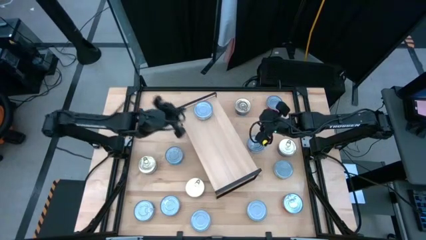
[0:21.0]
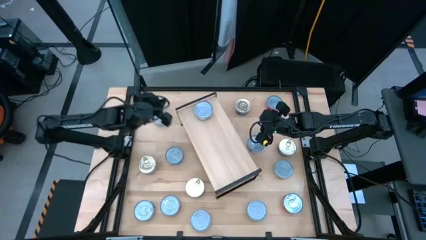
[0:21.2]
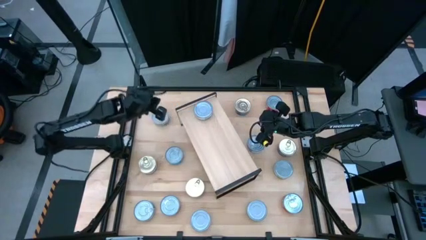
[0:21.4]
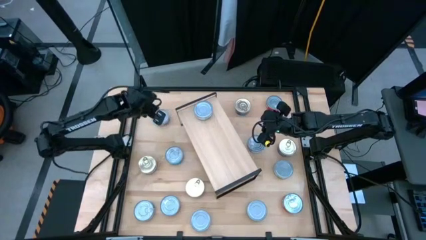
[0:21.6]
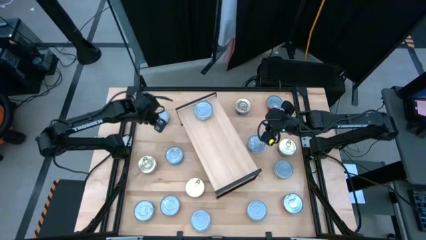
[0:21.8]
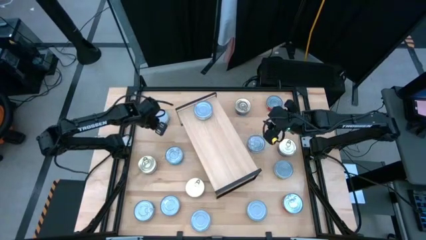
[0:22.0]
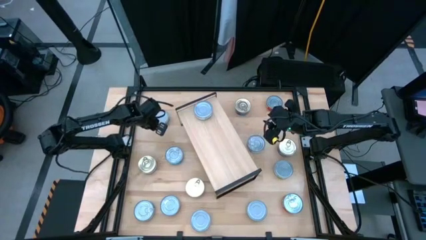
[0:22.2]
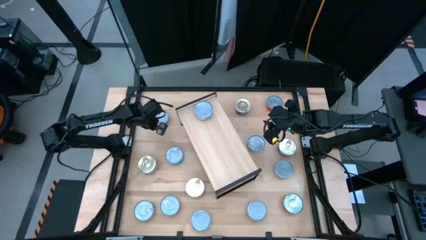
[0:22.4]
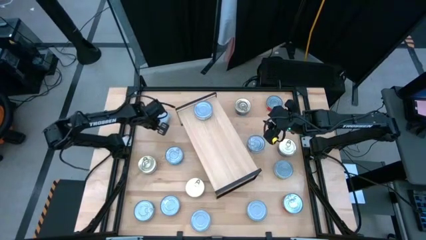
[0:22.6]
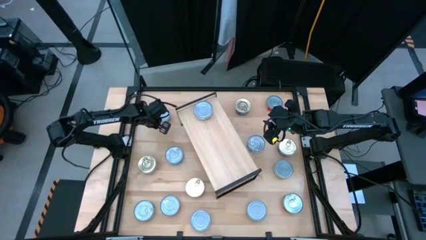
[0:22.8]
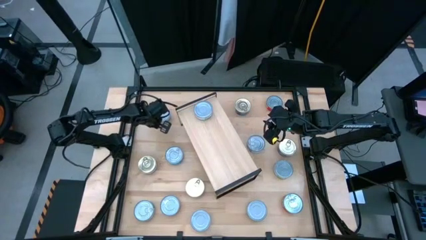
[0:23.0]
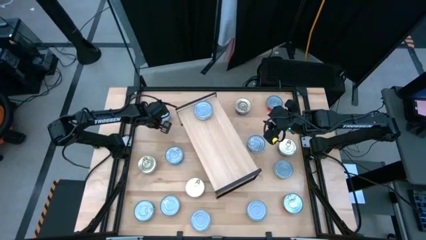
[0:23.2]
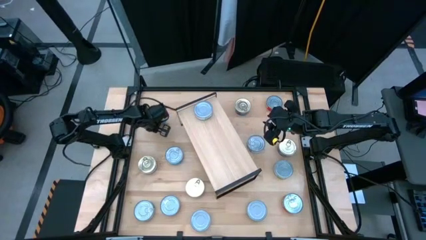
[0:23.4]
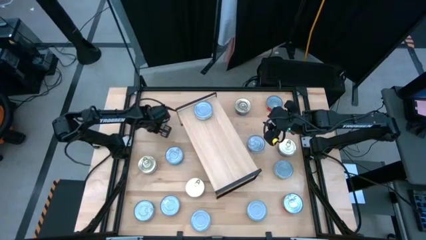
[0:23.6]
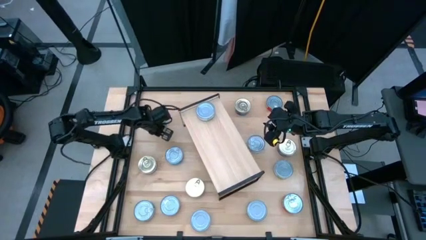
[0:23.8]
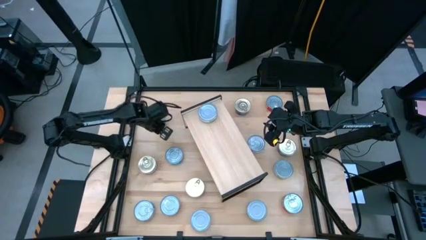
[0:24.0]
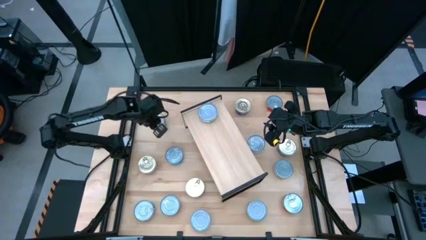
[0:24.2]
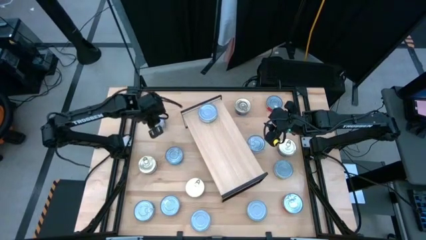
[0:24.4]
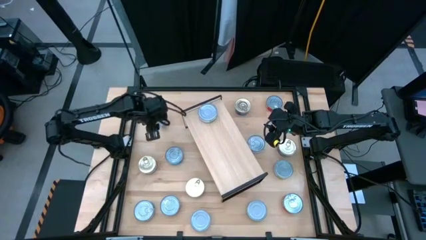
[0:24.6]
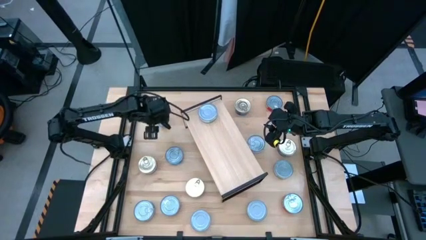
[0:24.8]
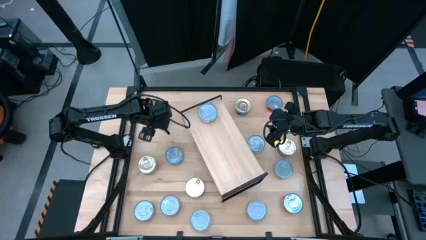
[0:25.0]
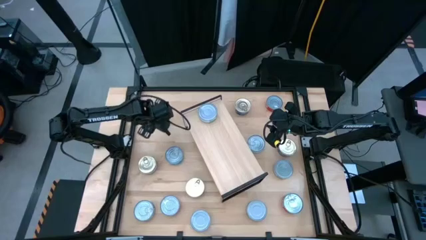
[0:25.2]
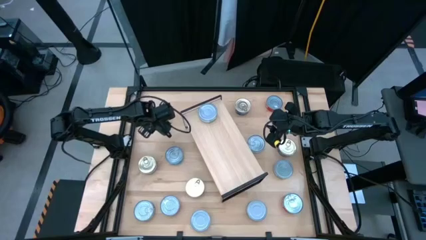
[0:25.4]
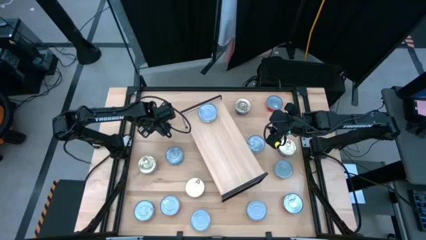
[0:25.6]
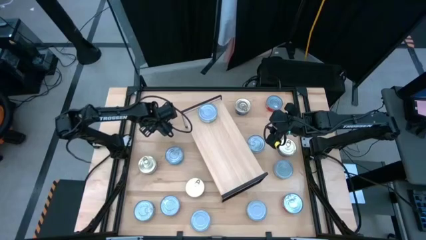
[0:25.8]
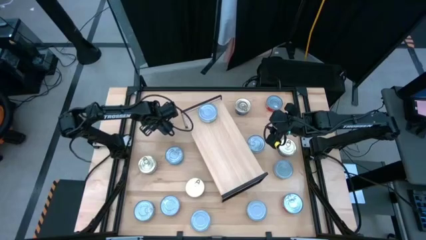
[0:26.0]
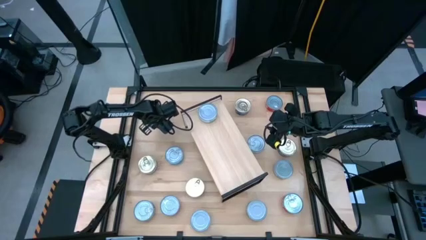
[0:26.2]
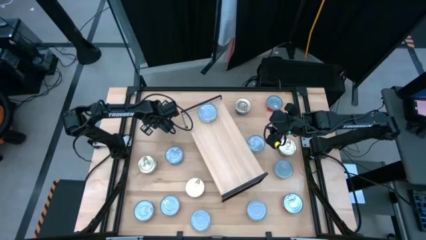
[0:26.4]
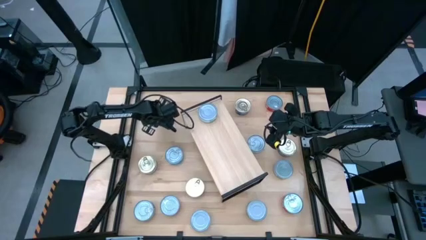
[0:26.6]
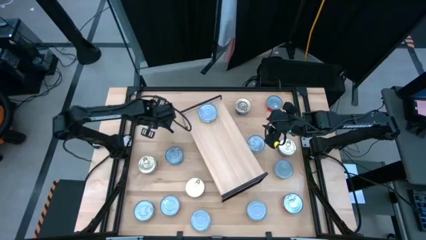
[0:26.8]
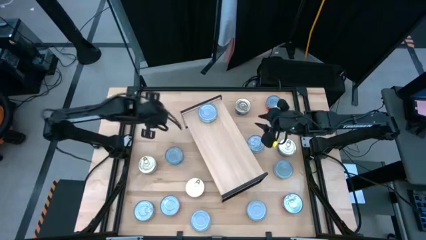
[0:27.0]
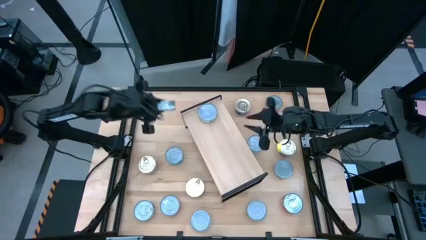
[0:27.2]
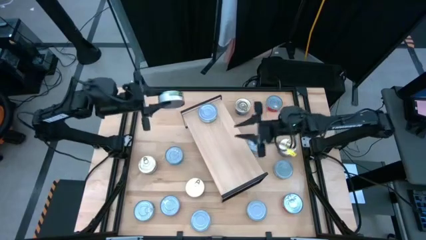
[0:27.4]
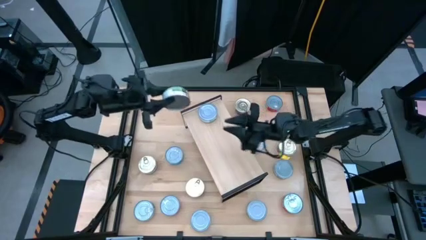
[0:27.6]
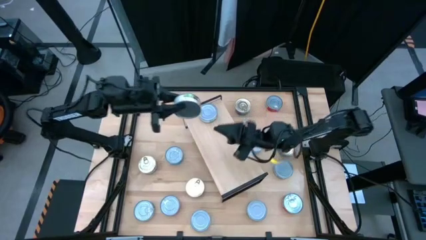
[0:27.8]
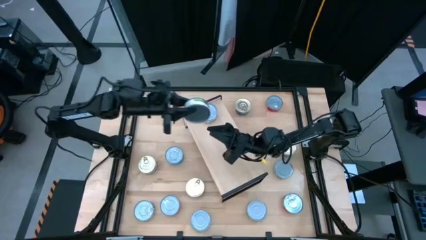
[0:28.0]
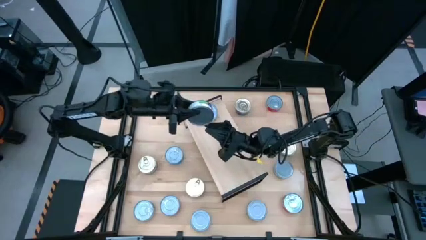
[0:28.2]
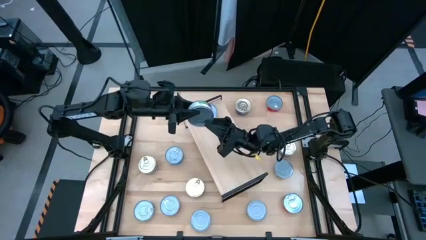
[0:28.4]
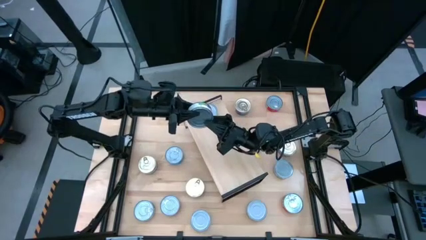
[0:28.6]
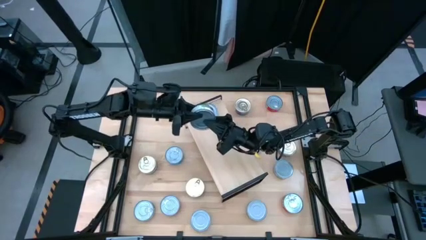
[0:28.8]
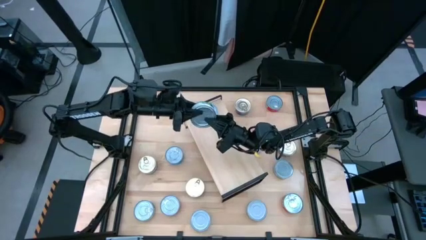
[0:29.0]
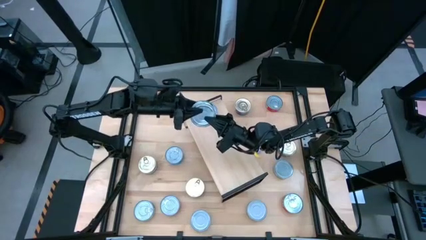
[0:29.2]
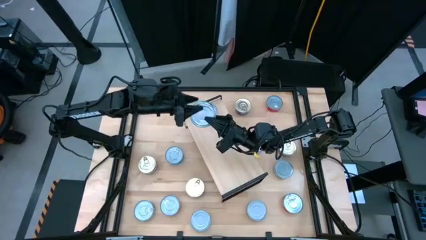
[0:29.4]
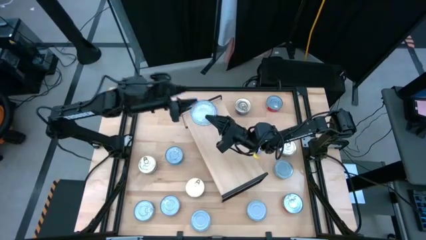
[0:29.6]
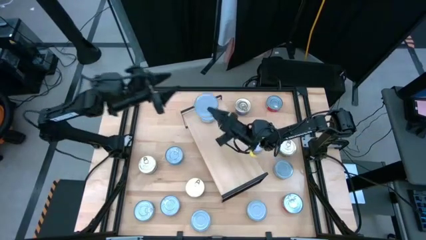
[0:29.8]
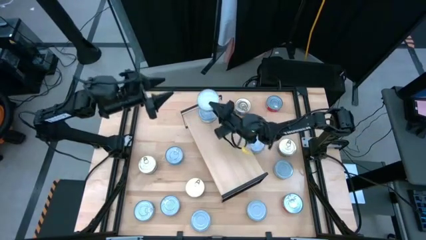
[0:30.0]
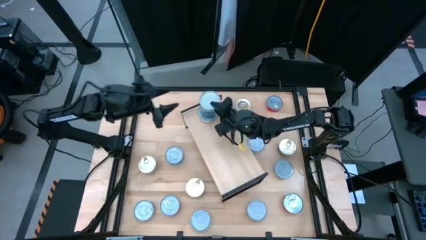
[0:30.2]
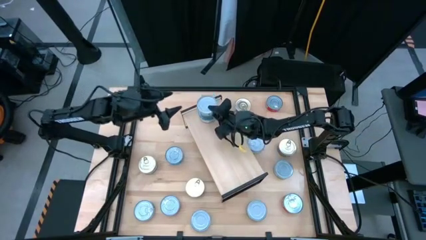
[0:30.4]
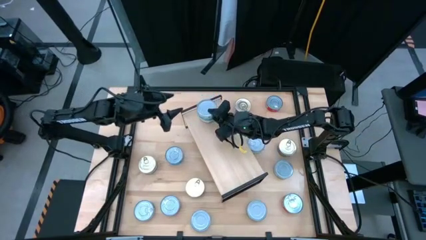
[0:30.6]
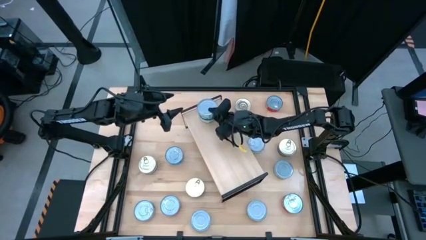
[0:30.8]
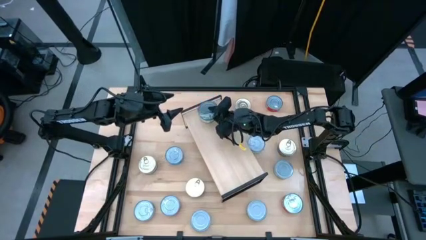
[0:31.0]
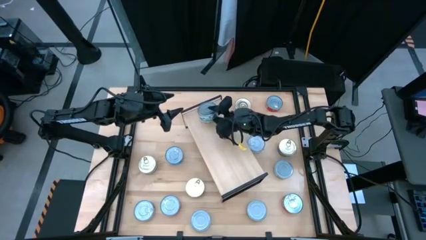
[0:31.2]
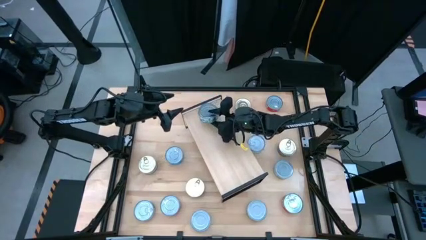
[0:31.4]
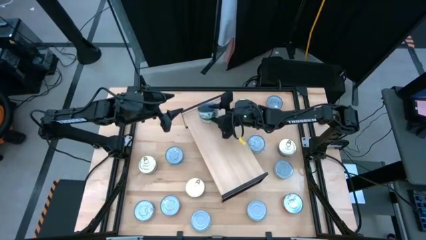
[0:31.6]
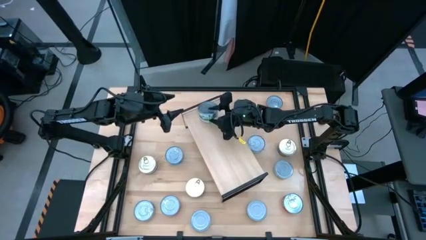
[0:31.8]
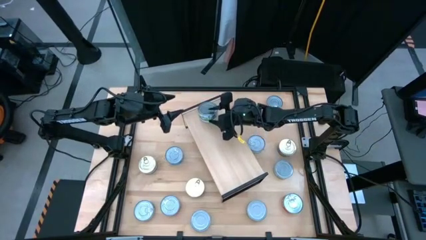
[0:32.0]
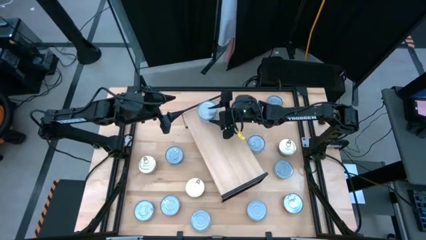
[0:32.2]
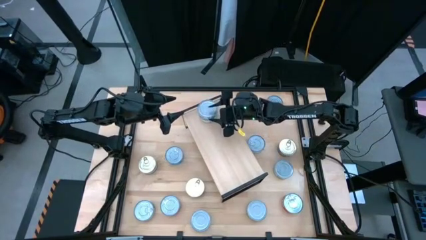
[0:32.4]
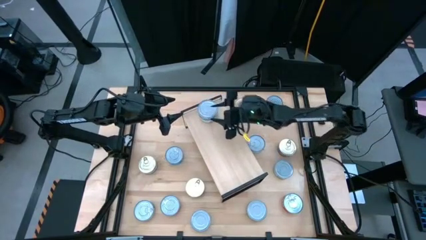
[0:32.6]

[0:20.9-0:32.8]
Task: Stack canned seafood by type on shelf
Stack the green tuna can on top of the other green tuna can on the shelf
